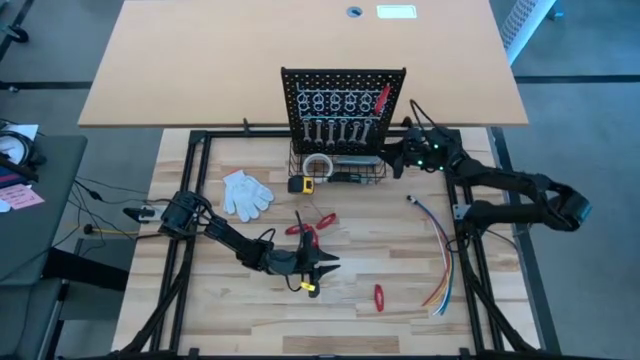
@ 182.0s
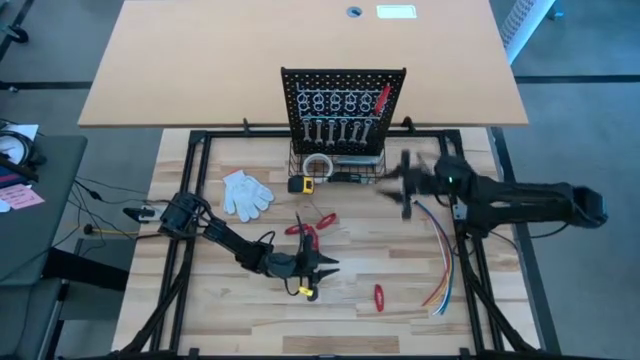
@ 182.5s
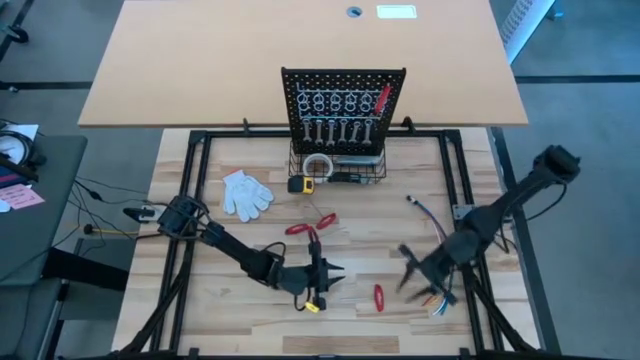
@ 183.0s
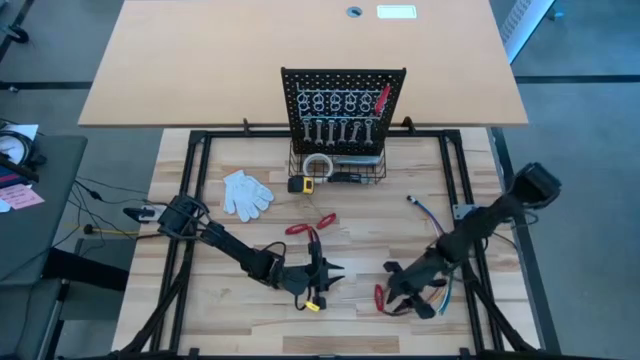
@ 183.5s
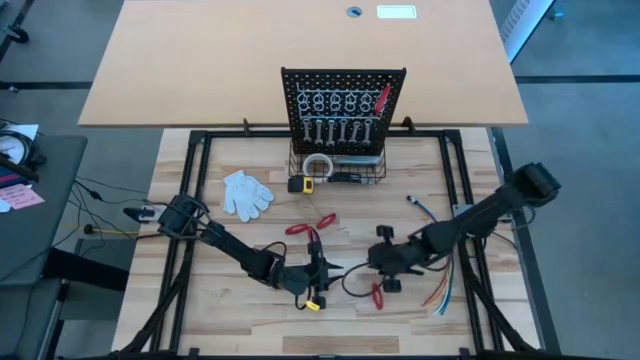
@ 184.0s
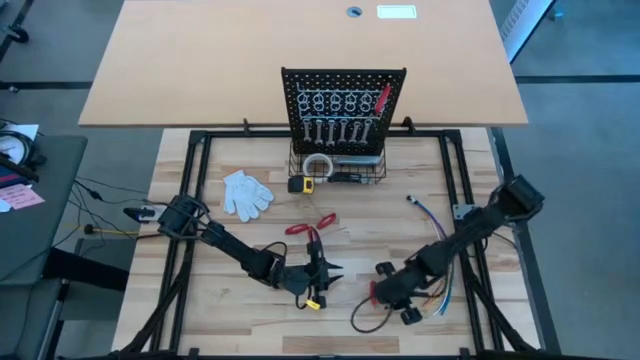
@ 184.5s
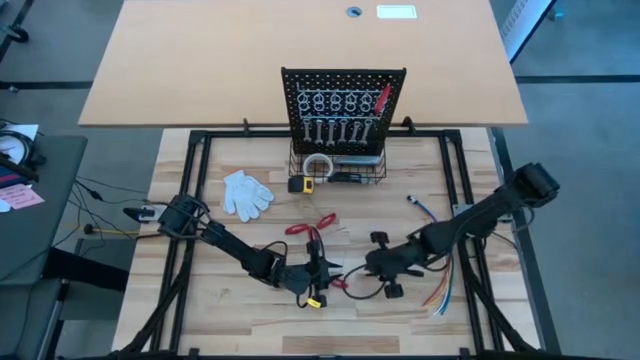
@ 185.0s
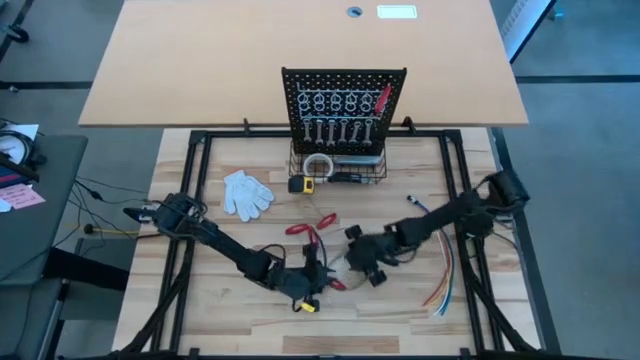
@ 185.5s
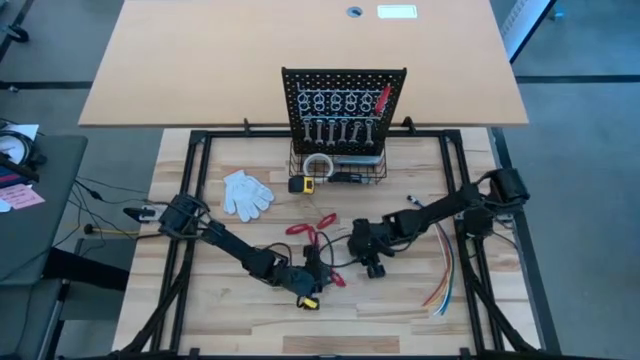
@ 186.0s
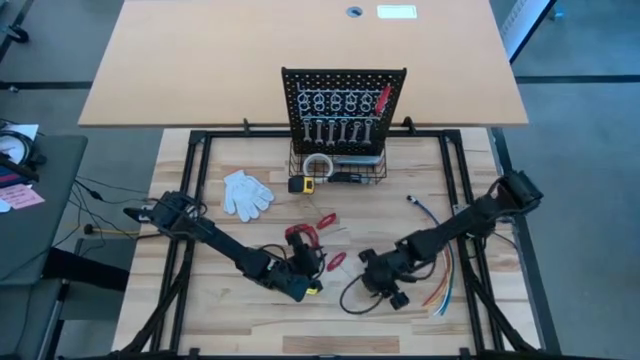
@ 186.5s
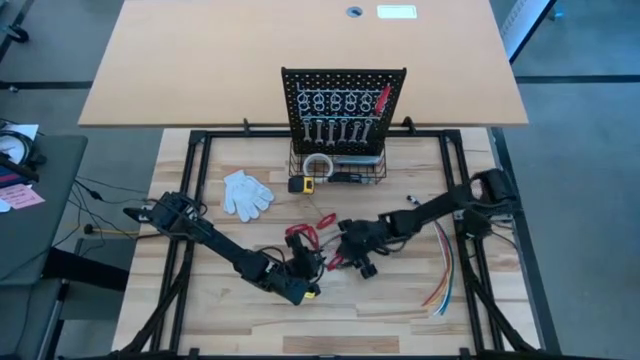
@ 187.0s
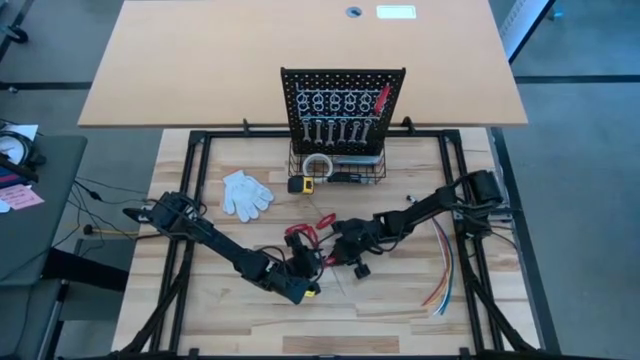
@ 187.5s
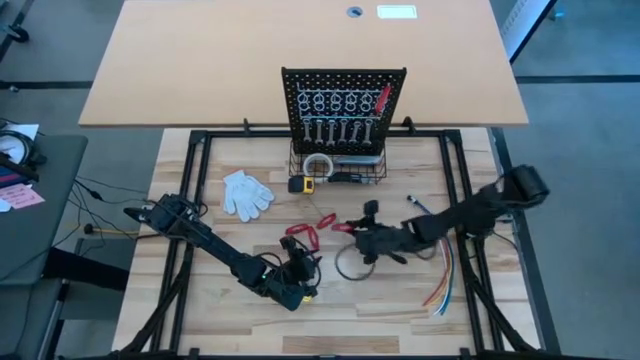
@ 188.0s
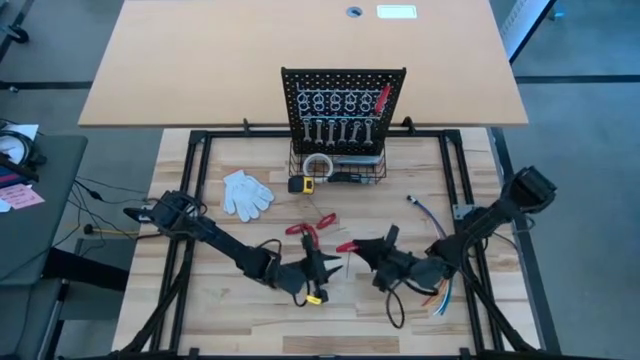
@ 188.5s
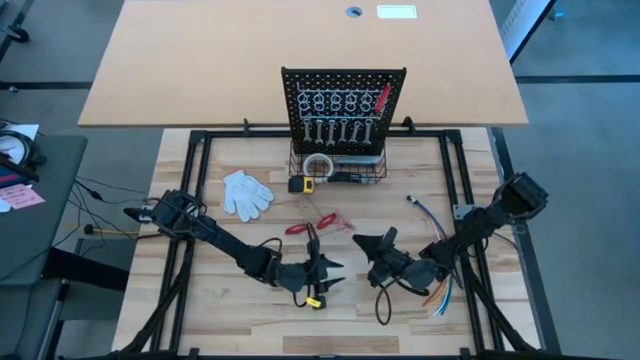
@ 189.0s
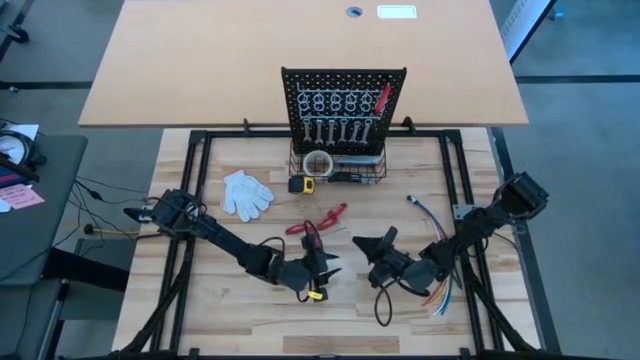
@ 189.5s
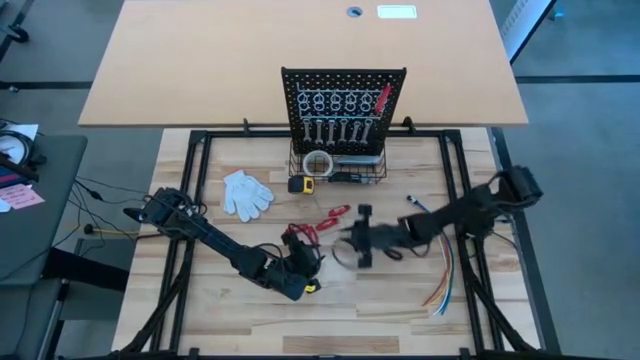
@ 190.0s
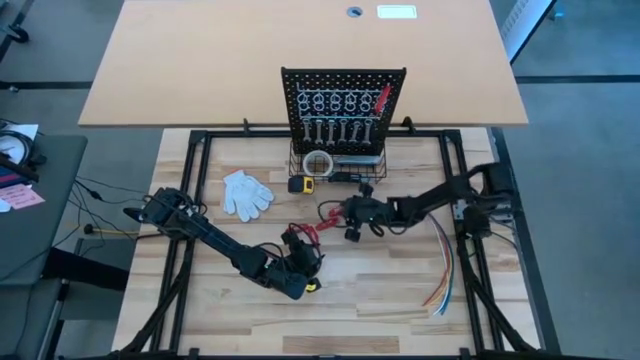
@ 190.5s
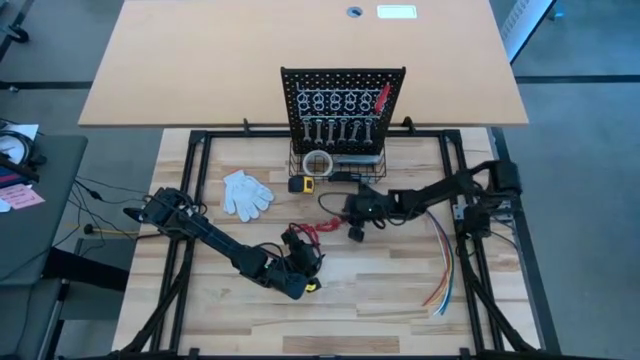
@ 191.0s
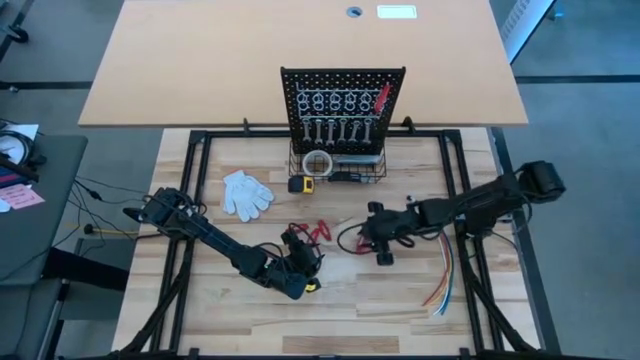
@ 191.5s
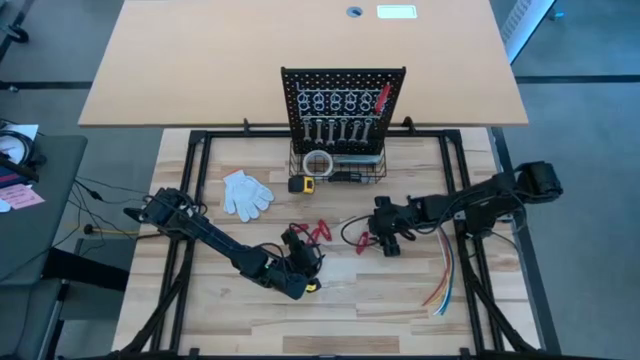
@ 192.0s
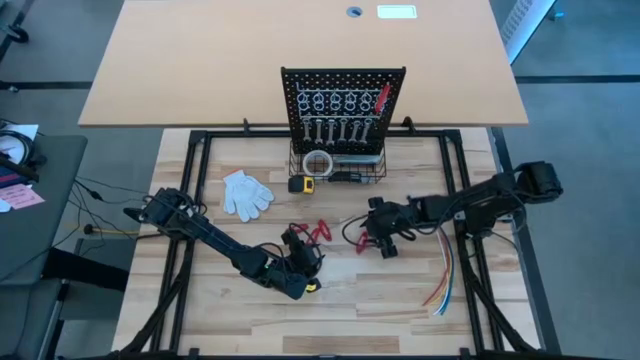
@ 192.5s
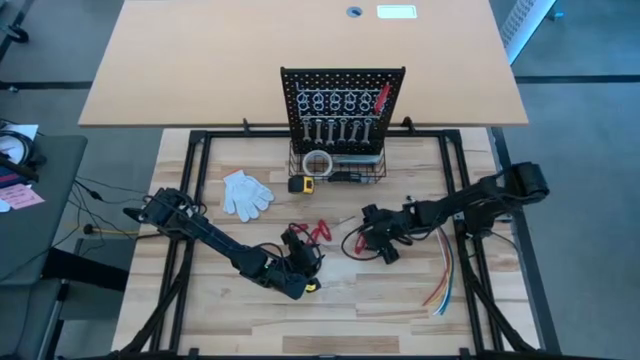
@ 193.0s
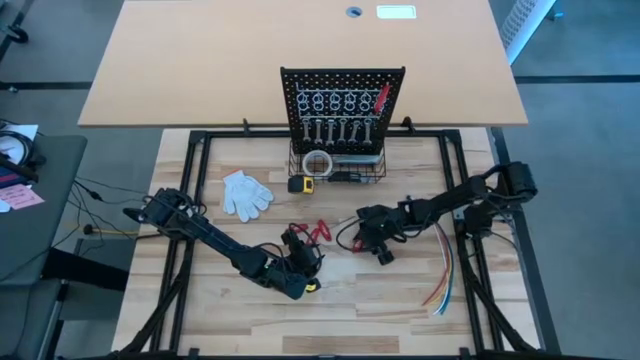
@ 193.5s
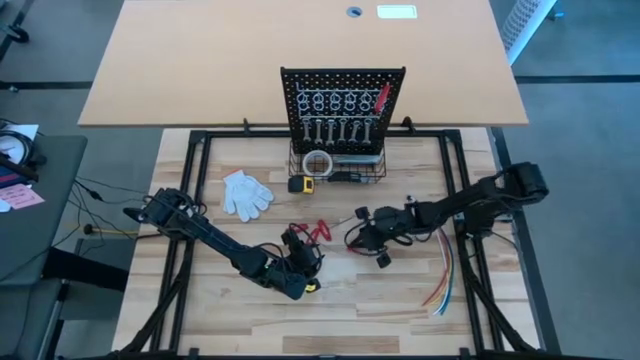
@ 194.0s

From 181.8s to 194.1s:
Task: Hang tools onto peg board
Hang the red allen wrench on the peg board

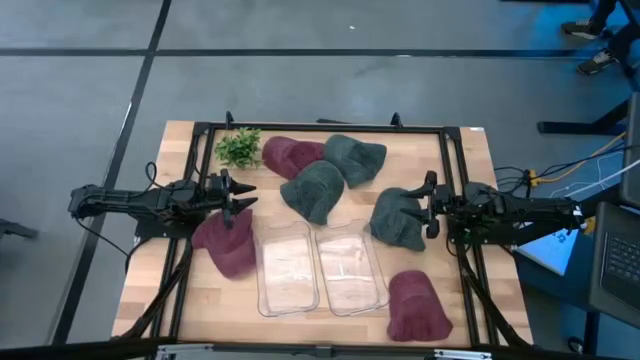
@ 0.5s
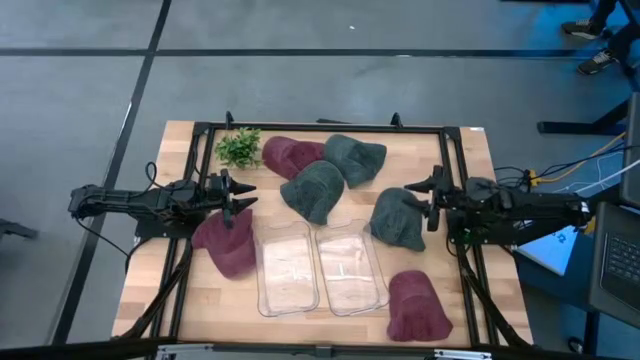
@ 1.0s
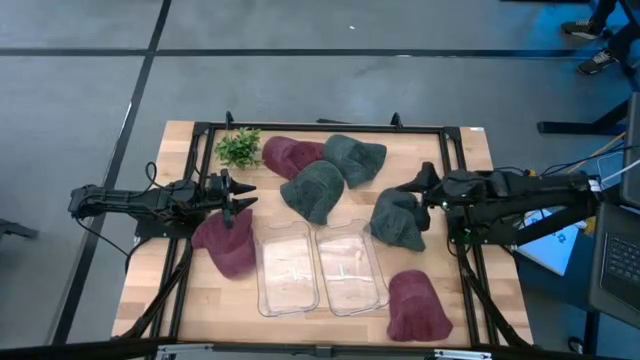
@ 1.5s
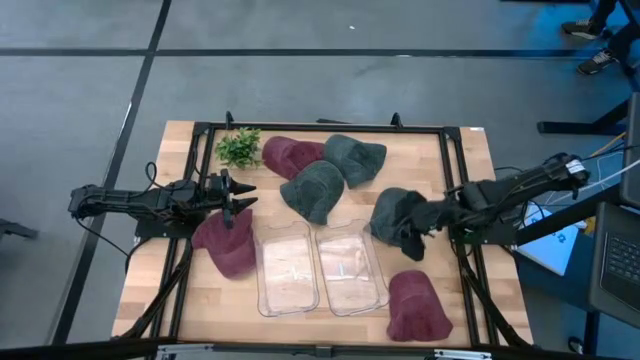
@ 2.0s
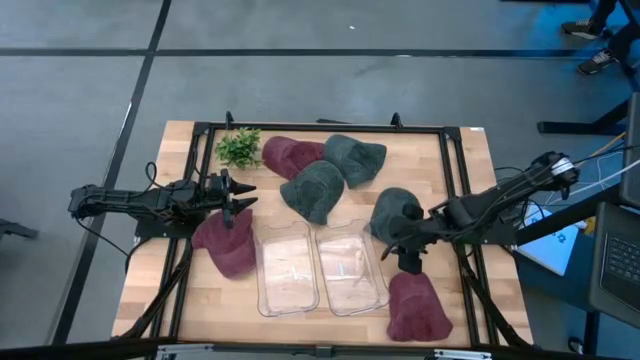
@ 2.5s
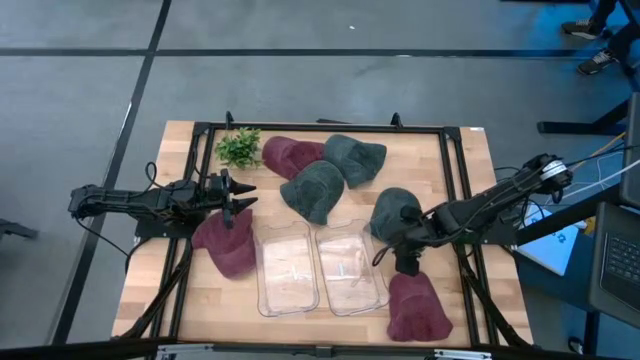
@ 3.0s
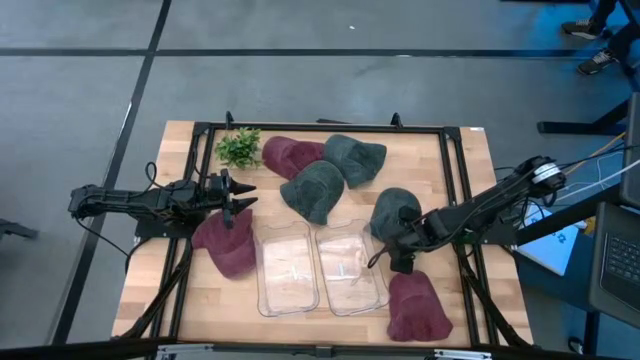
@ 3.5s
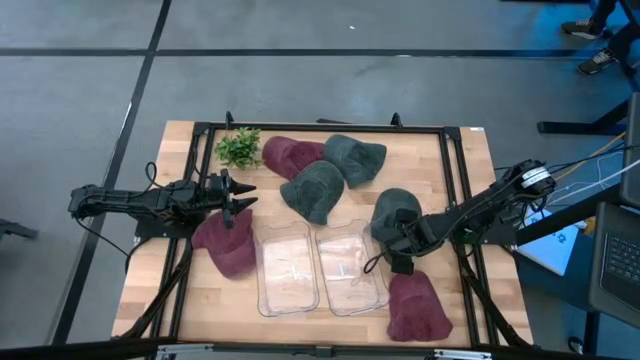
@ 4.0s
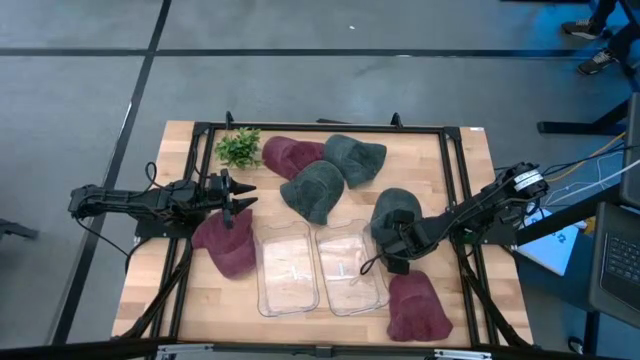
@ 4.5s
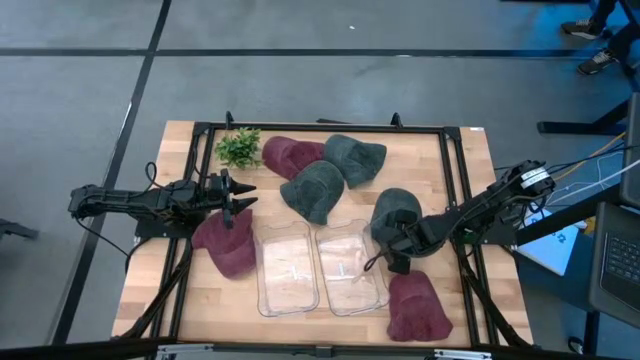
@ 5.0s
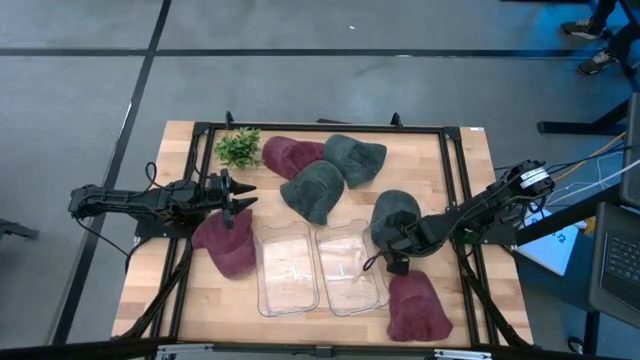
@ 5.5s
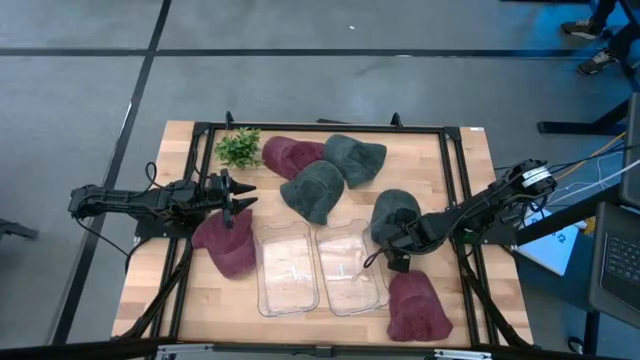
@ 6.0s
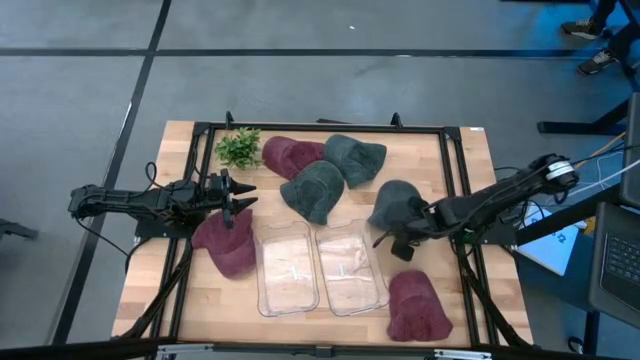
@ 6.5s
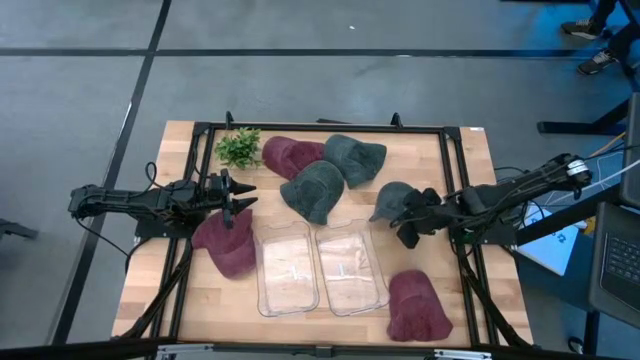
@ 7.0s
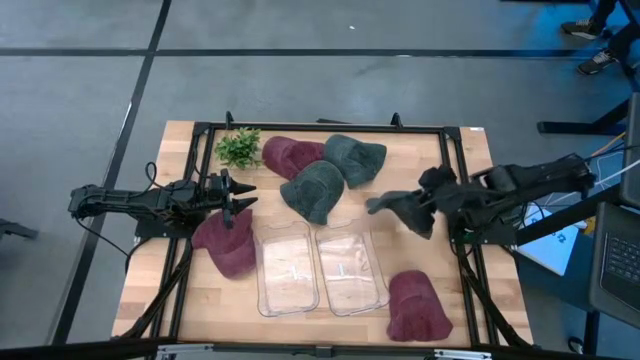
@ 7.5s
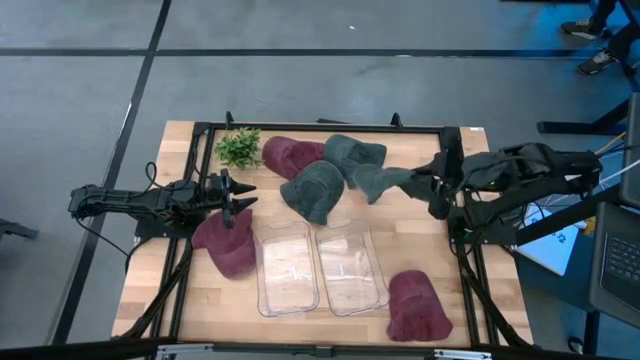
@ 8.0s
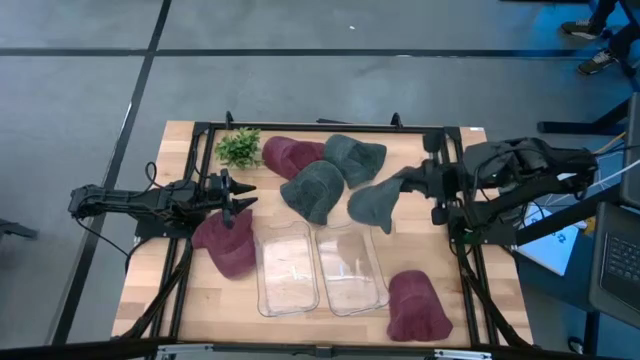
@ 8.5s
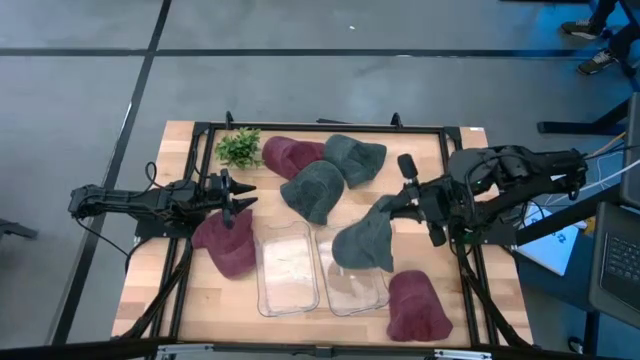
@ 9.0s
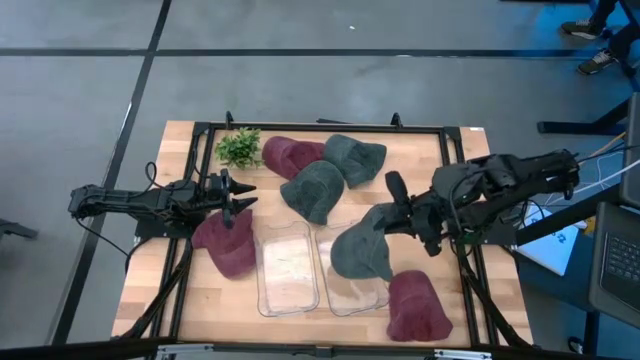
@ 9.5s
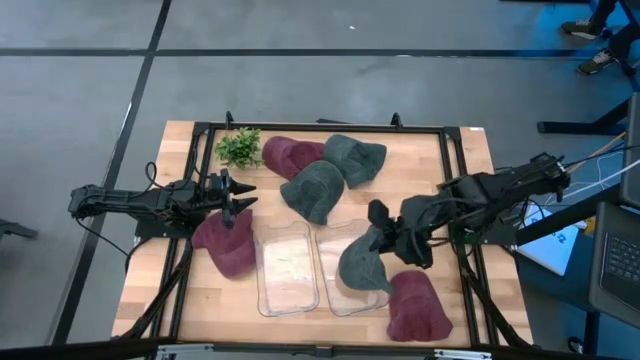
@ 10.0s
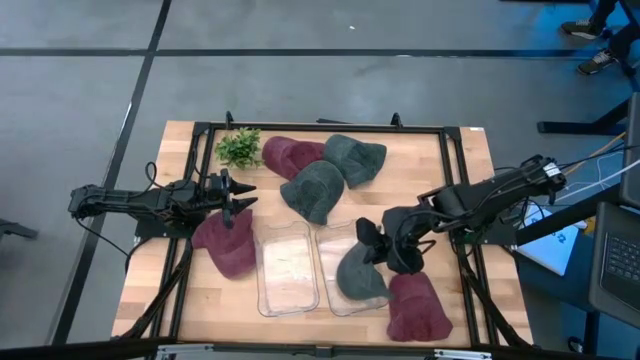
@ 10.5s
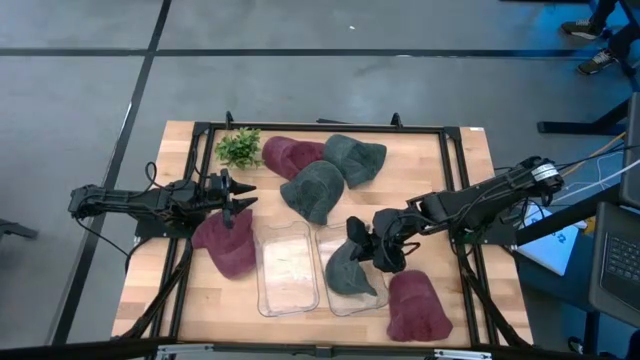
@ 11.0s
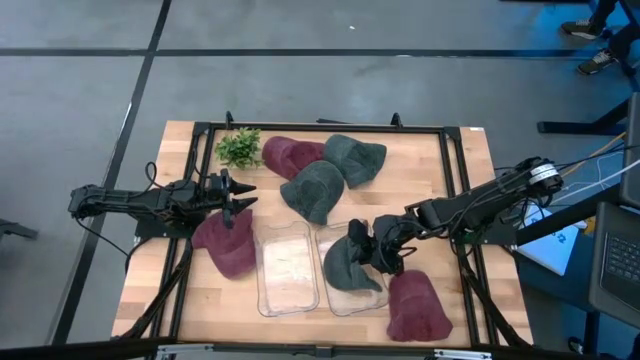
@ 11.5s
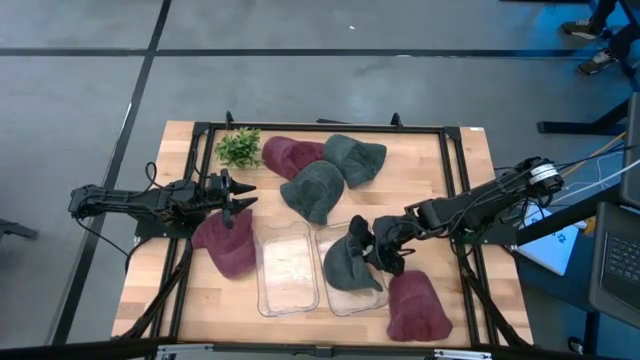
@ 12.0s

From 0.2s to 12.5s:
Task: Pick & Place hat
Put the bottom right black cap into the right transparent bin
